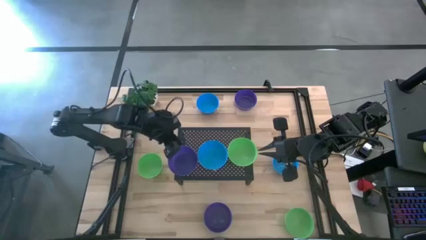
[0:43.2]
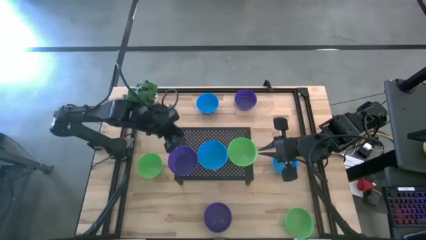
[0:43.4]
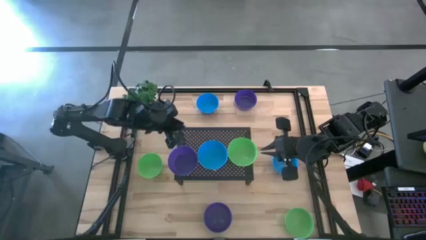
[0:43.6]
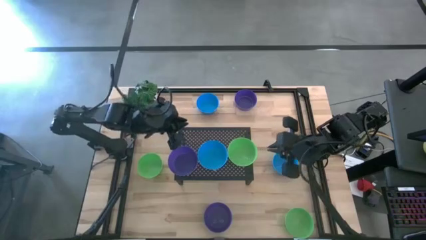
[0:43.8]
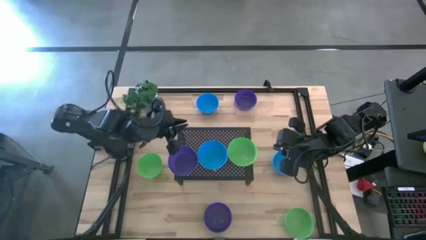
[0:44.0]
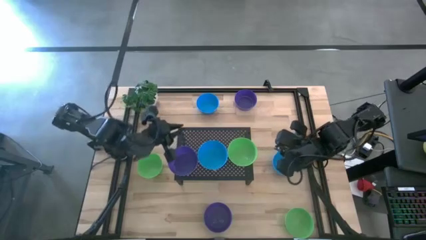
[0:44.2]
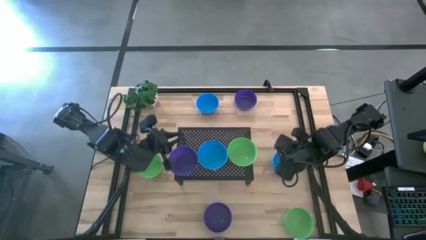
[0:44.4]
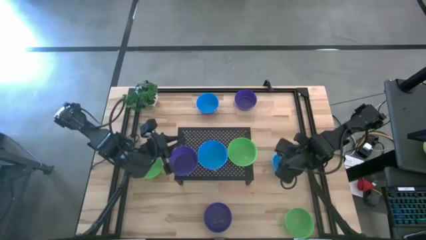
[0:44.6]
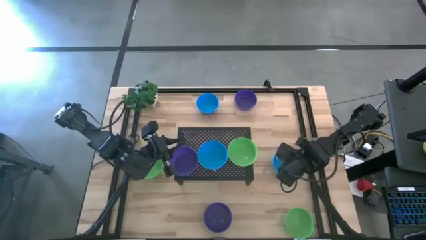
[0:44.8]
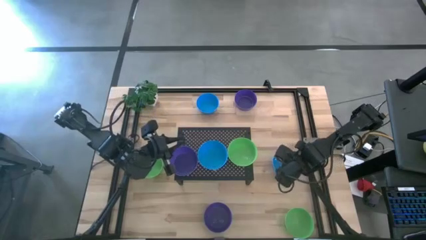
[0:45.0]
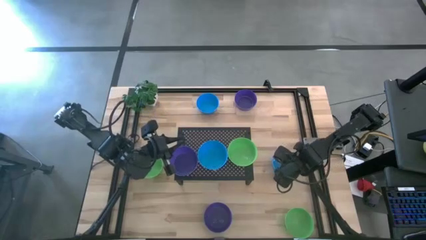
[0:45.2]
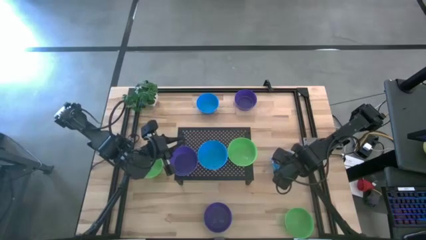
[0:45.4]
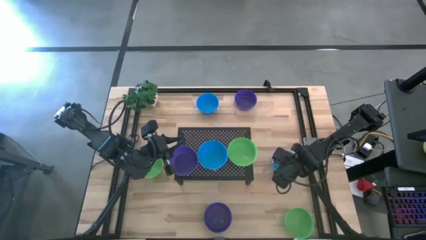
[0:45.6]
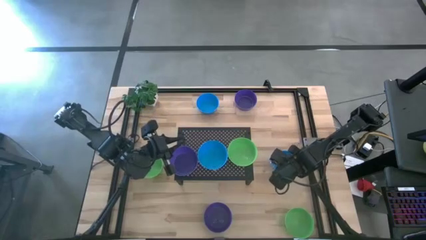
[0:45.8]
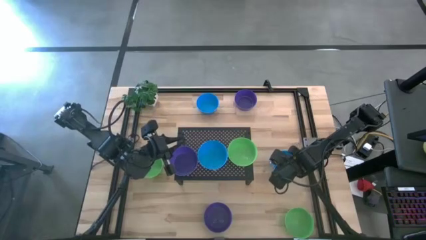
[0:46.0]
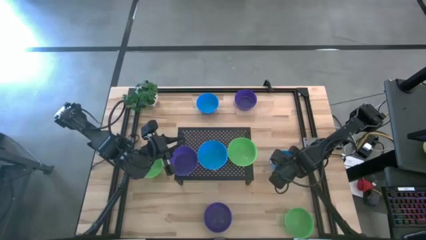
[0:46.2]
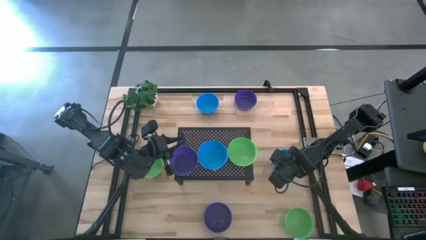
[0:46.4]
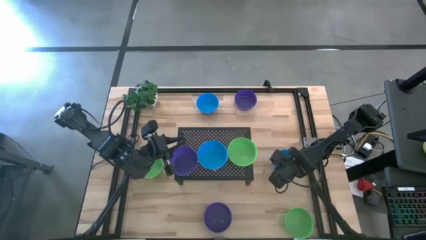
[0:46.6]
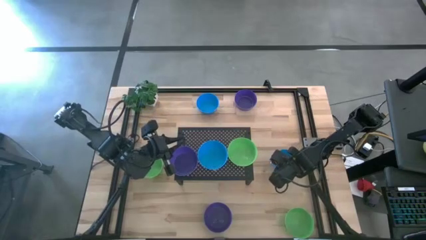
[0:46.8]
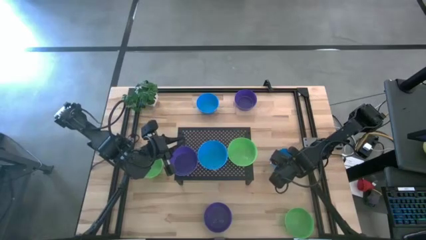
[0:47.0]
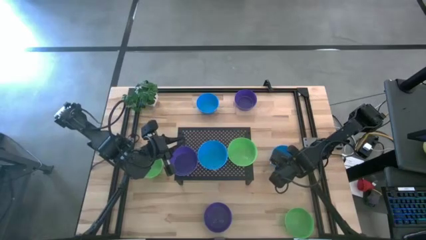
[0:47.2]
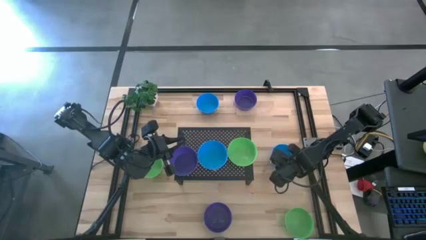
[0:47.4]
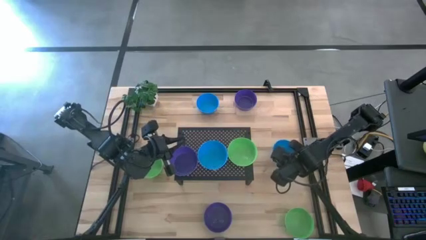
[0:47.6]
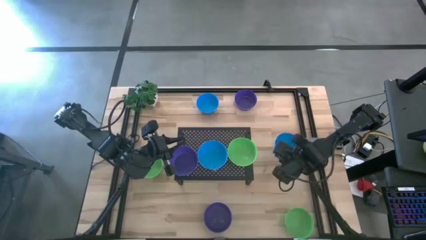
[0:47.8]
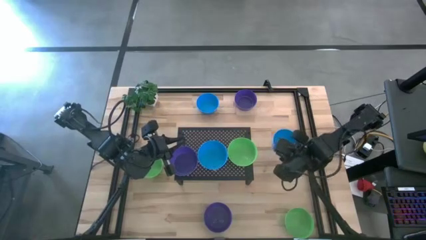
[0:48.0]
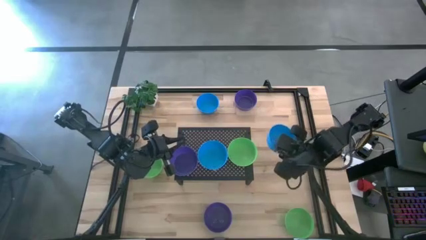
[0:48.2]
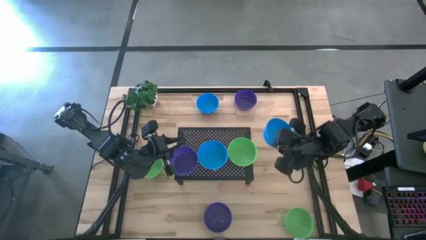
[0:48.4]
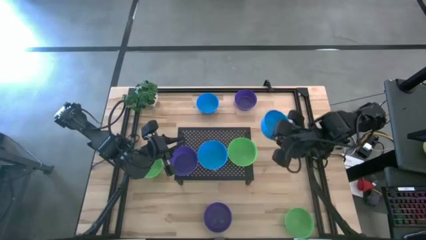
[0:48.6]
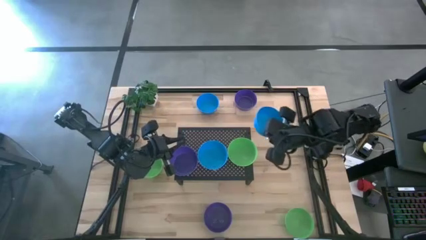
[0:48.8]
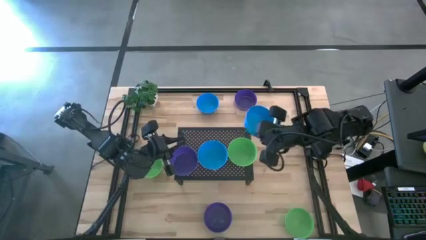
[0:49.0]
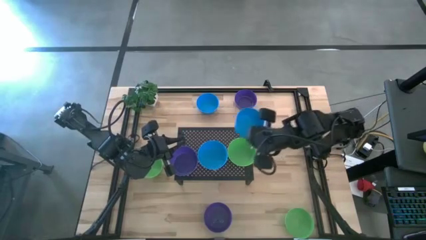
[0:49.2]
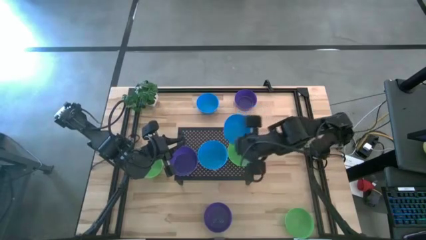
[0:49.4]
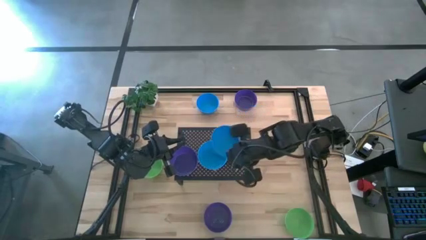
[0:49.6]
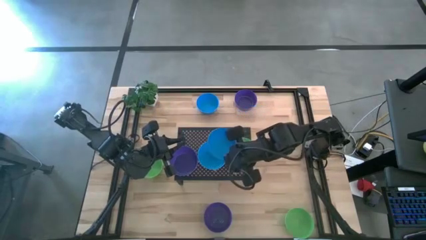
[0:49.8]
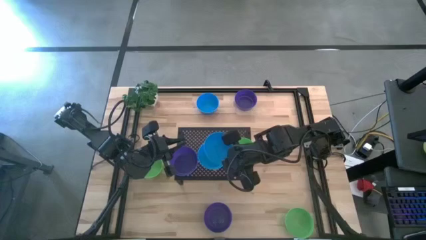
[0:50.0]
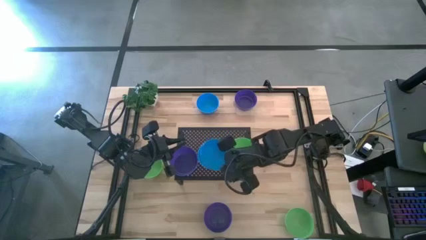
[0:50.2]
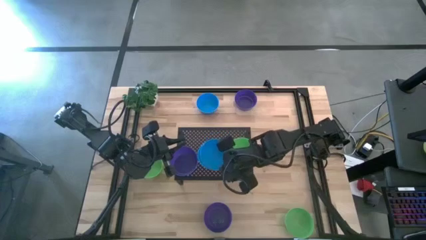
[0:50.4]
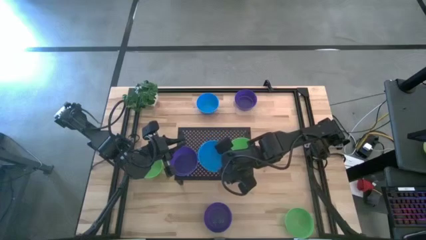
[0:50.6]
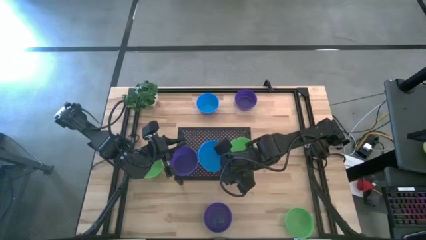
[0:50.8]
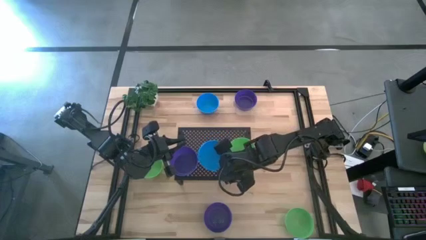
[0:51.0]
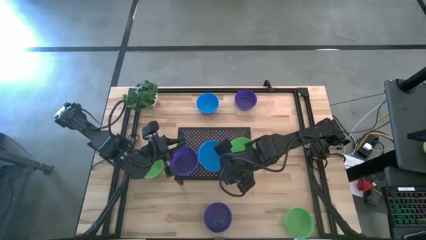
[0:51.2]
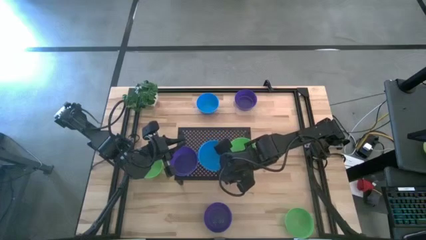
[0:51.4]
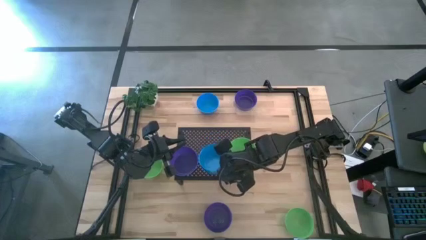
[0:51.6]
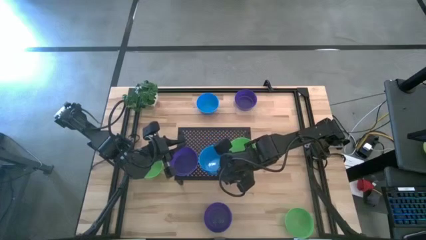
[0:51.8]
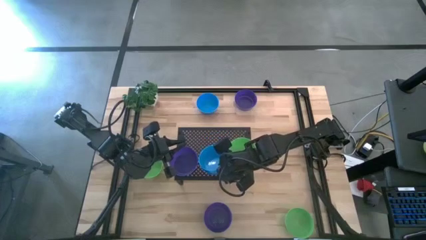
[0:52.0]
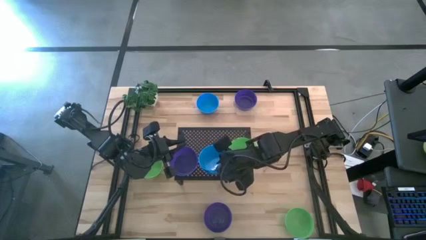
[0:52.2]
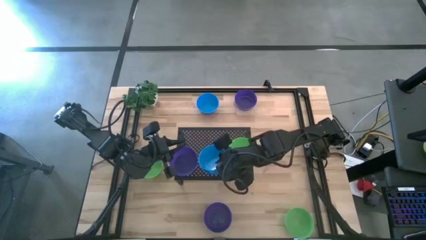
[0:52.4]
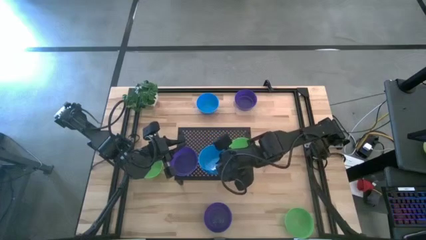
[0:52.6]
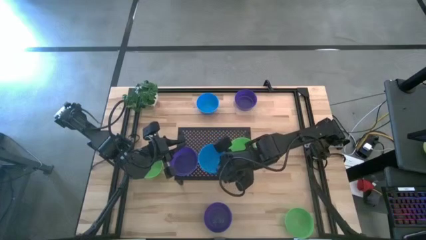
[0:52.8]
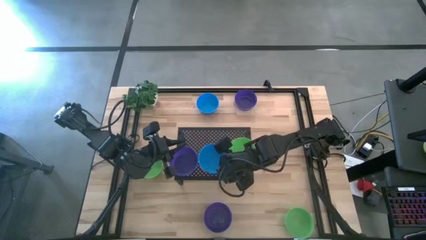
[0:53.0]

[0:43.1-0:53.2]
Task: Pick & Place Mini bowls
Stack the bottom blue bowl on the blue bowl on the shelf
